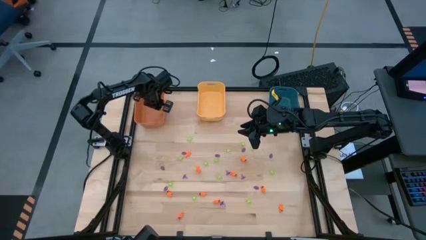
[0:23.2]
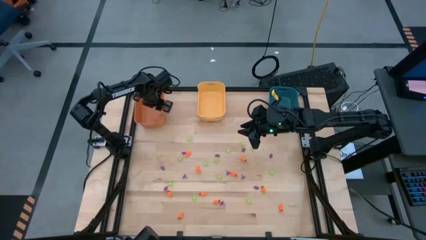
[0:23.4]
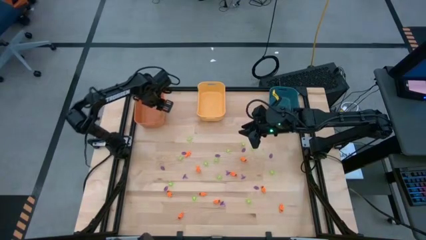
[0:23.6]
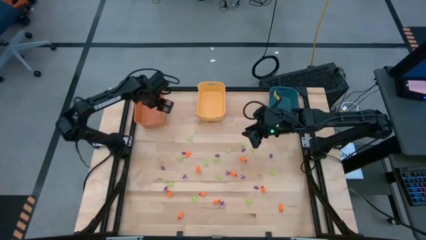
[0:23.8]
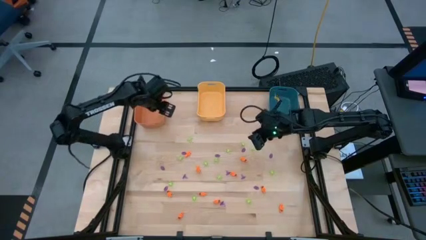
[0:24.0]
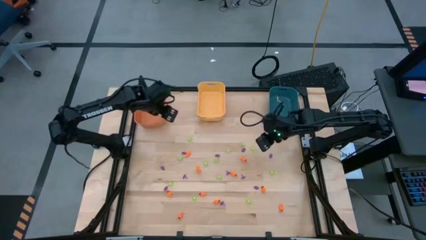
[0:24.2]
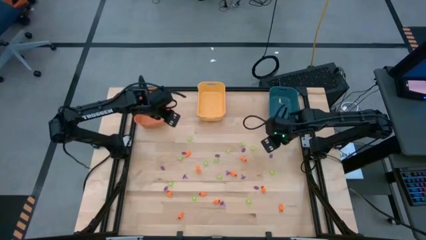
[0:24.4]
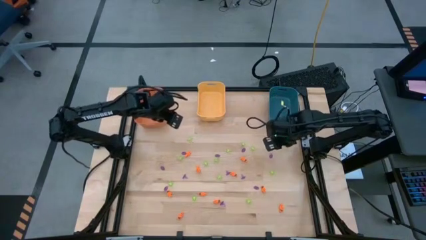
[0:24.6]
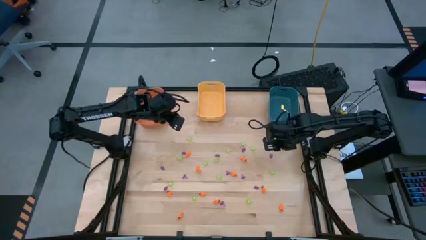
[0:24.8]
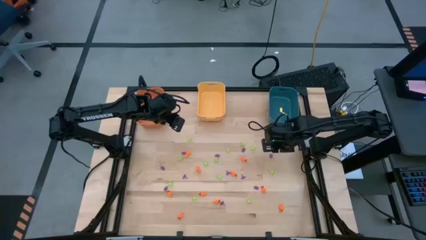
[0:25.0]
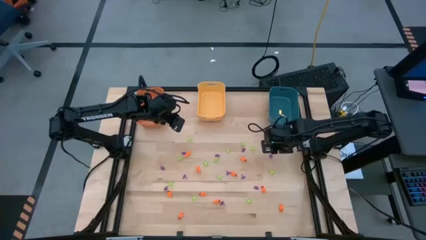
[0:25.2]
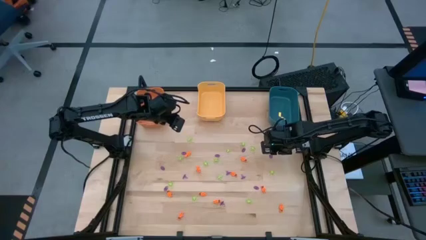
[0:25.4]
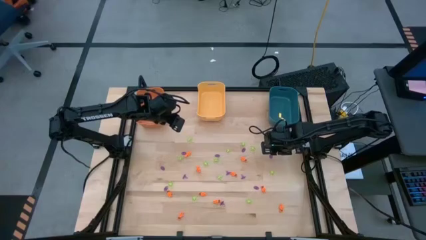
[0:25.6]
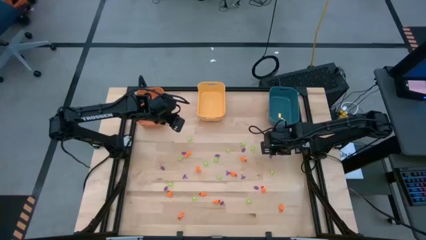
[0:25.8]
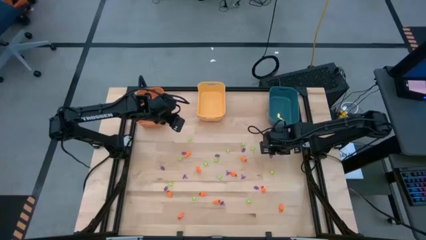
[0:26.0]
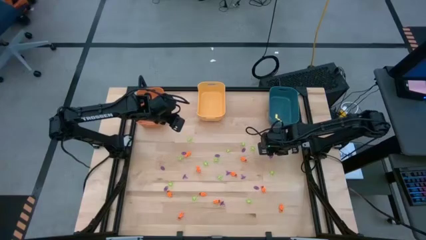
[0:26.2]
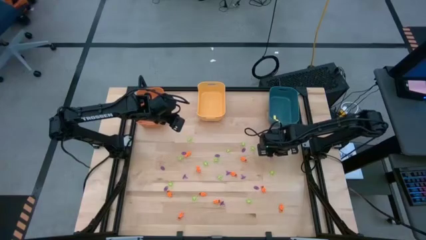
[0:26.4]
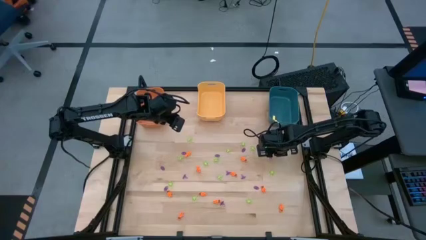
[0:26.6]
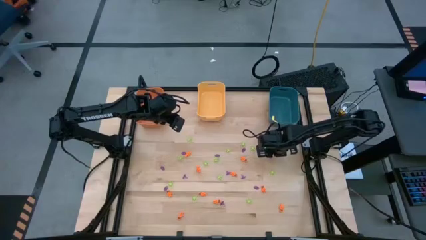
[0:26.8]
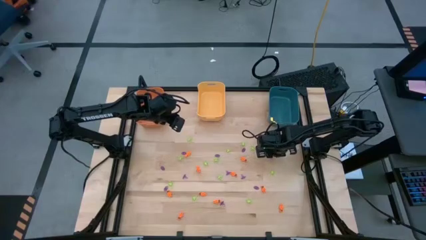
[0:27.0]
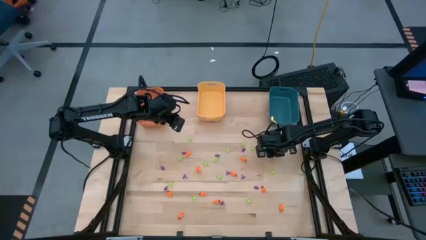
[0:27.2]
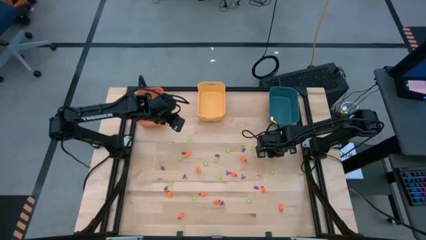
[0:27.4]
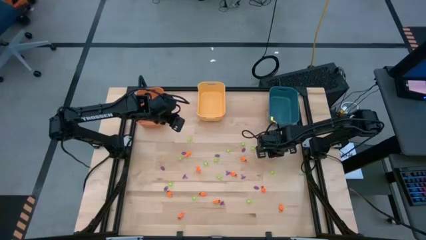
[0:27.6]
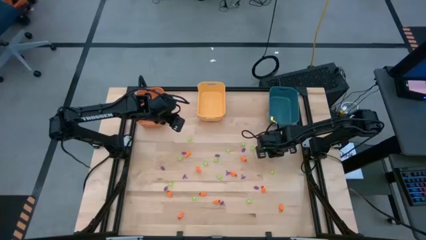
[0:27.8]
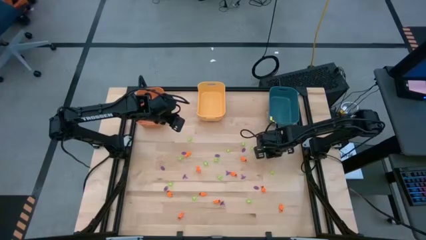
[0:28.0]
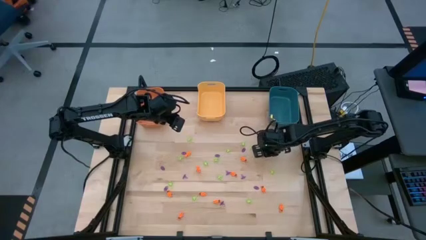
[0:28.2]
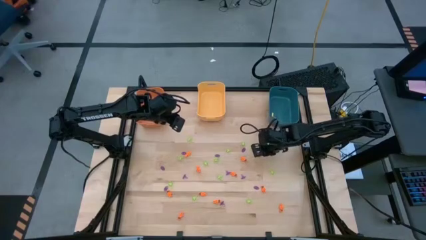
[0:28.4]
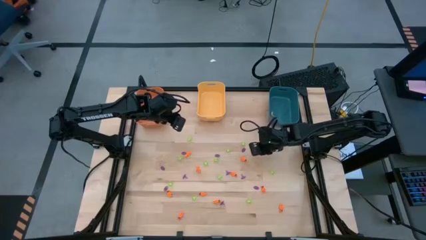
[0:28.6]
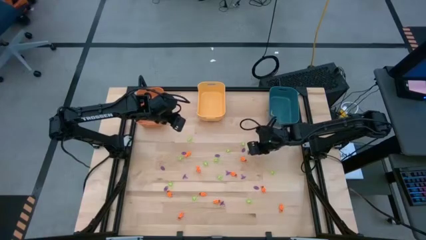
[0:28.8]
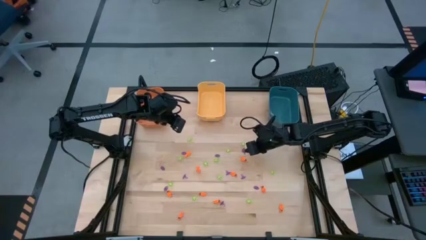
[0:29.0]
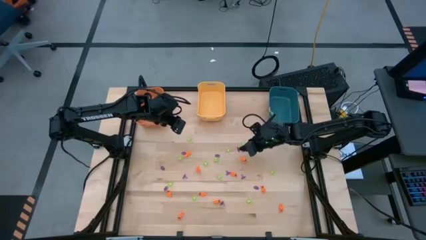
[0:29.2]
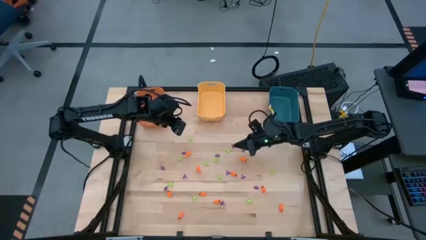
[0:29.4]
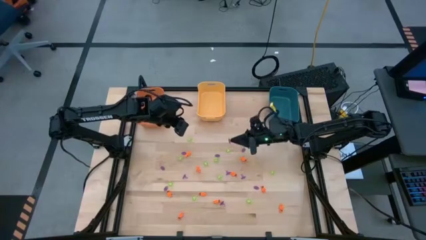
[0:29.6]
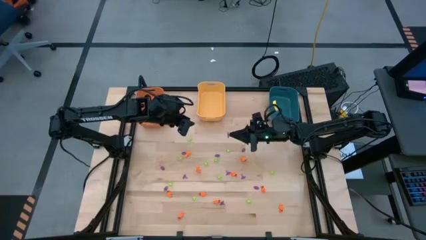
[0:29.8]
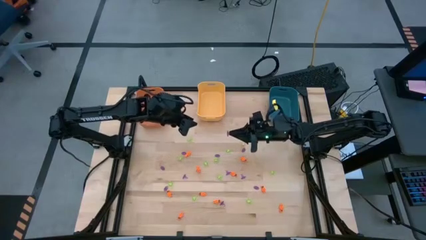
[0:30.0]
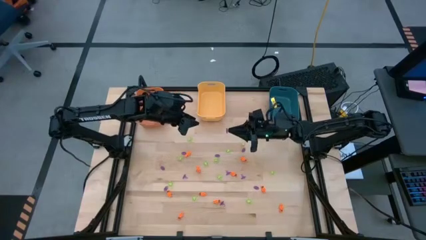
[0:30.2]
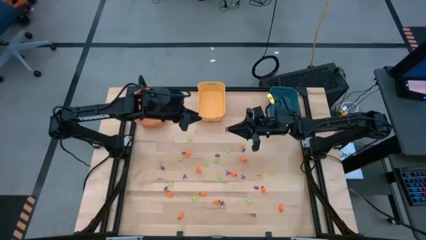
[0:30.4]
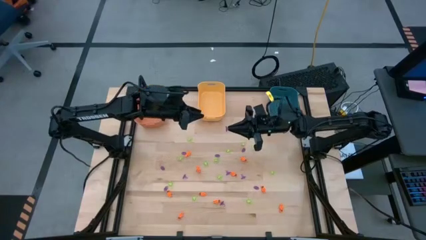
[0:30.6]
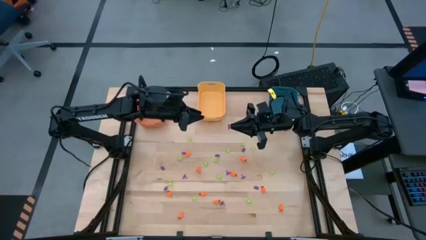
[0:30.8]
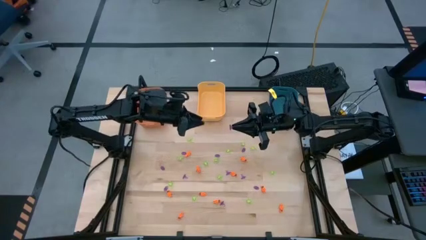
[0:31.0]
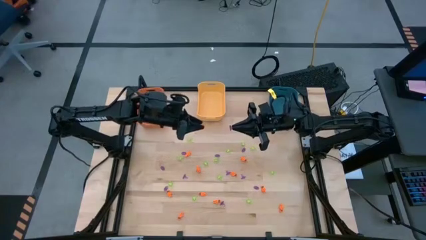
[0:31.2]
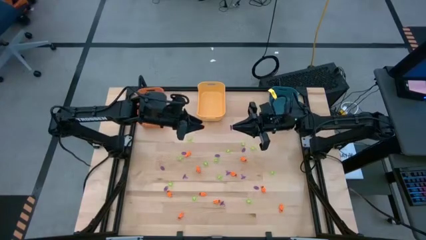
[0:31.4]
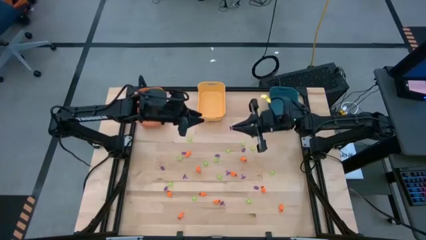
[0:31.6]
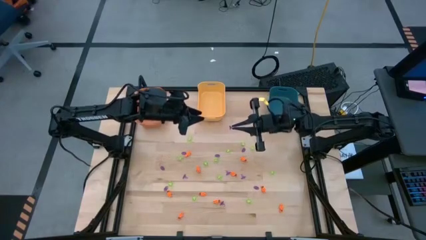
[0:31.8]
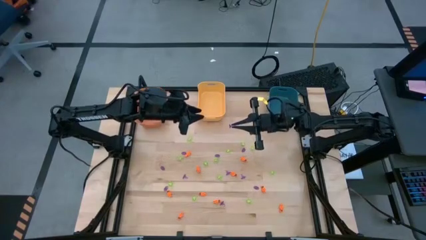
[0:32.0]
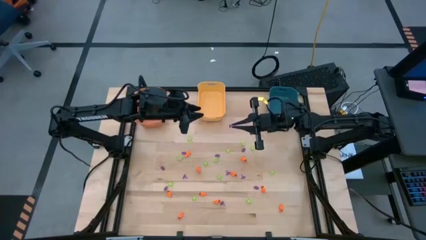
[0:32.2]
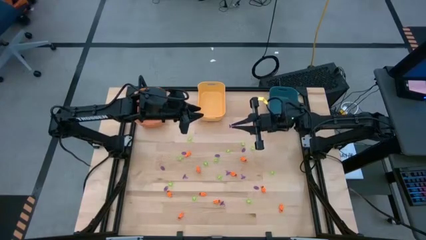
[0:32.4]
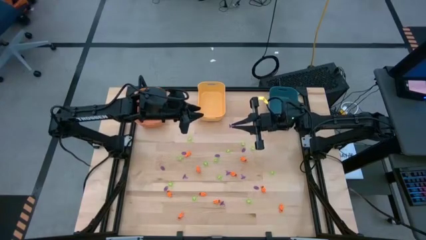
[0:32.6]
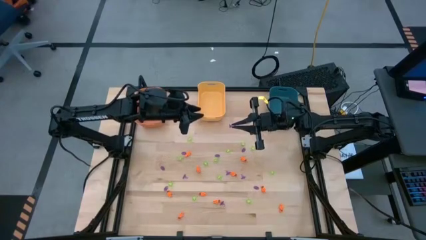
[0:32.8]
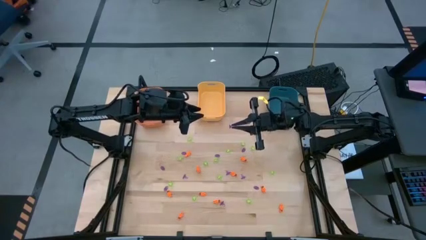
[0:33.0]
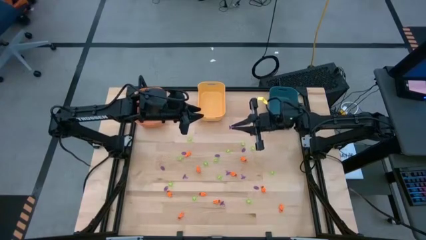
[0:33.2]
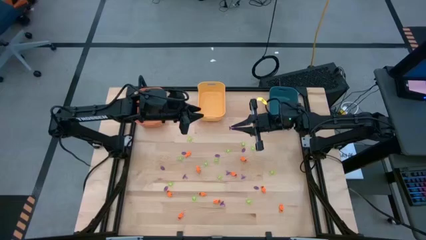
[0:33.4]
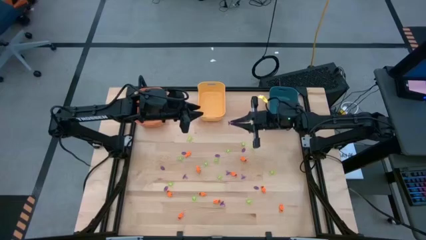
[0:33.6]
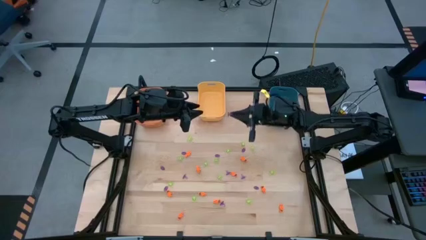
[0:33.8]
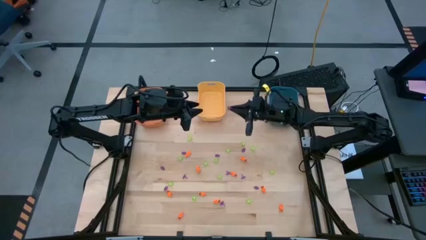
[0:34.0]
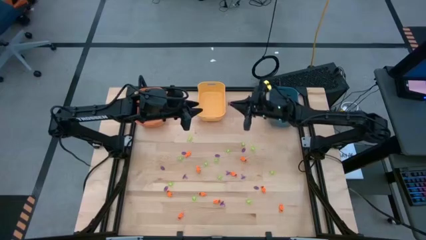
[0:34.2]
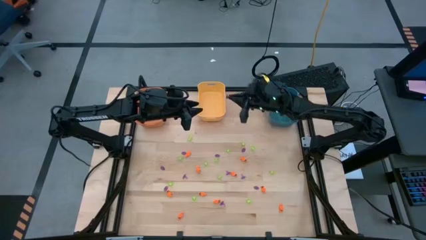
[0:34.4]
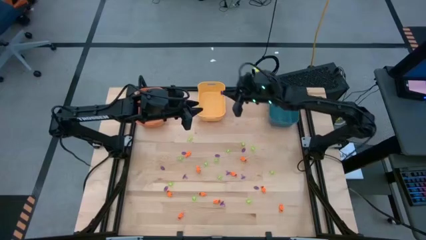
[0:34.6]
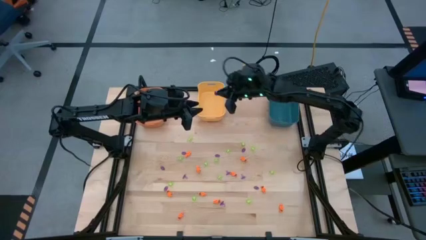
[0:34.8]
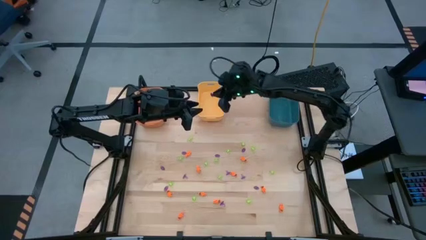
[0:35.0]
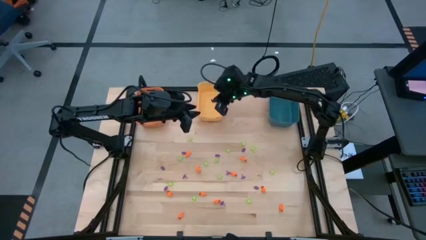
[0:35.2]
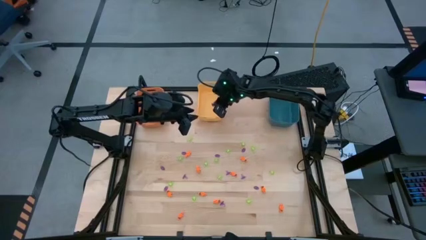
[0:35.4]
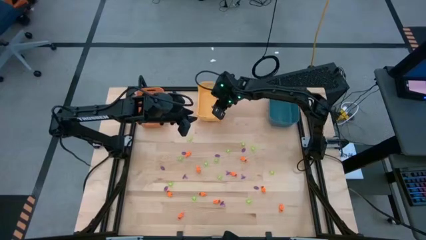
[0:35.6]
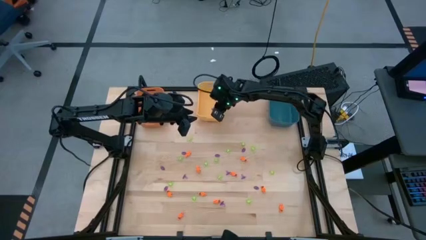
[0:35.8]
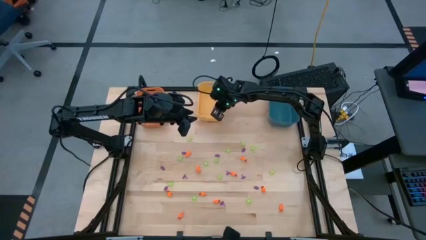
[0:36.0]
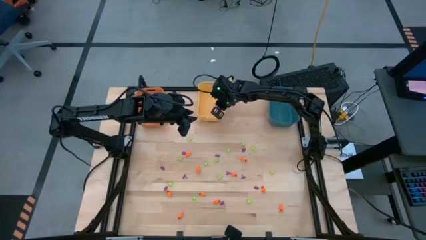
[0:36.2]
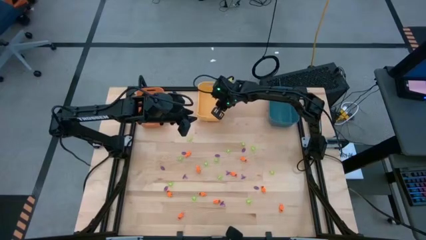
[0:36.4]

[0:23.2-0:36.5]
Task: Sort Halloween decoration
Put the purple witch hat toy into the yellow bin

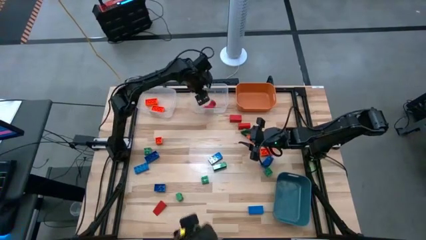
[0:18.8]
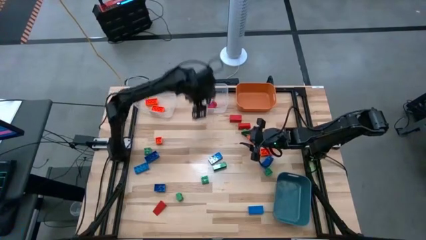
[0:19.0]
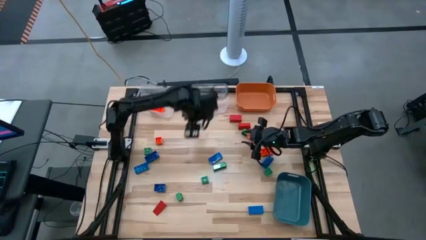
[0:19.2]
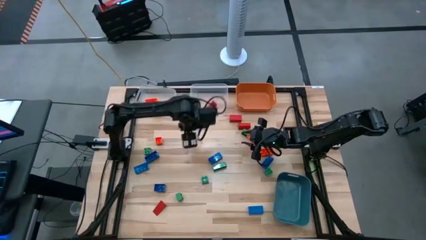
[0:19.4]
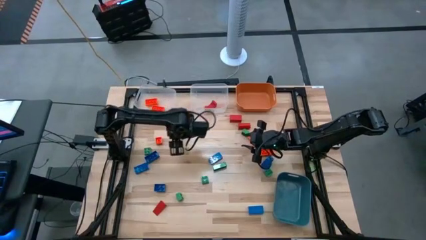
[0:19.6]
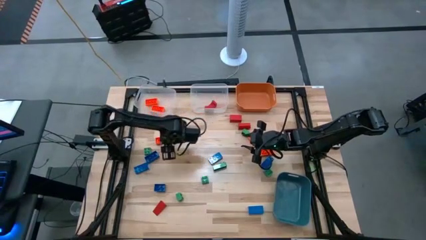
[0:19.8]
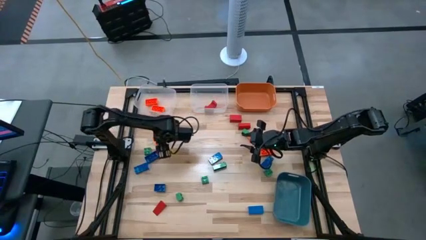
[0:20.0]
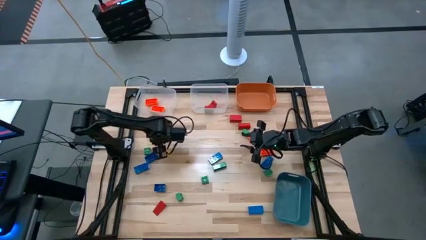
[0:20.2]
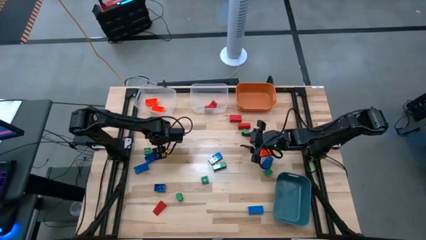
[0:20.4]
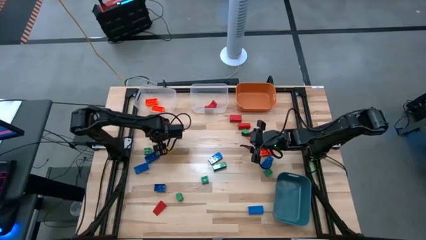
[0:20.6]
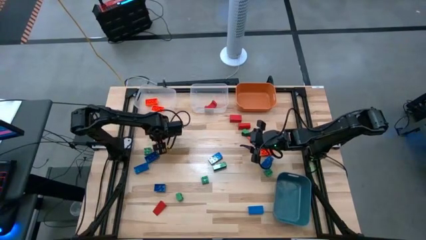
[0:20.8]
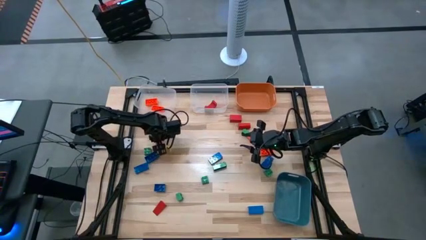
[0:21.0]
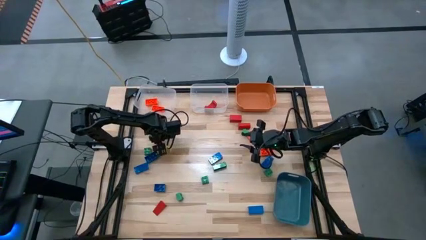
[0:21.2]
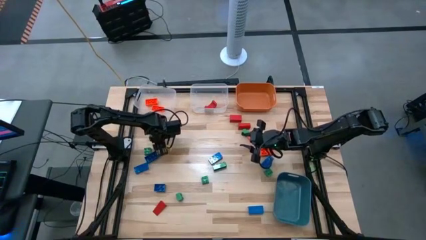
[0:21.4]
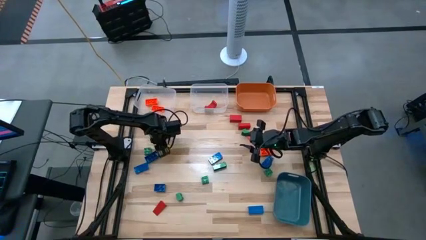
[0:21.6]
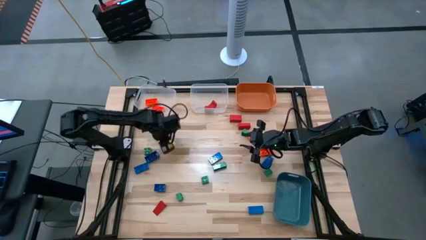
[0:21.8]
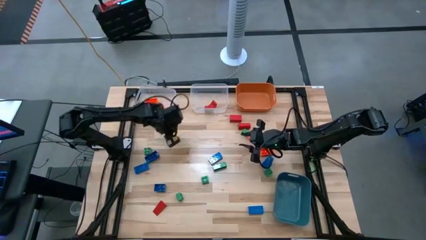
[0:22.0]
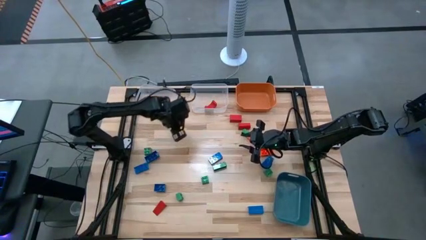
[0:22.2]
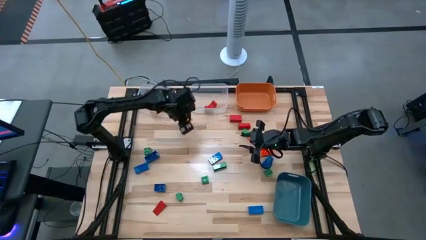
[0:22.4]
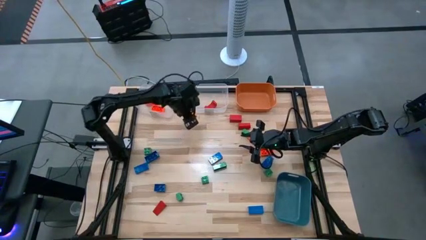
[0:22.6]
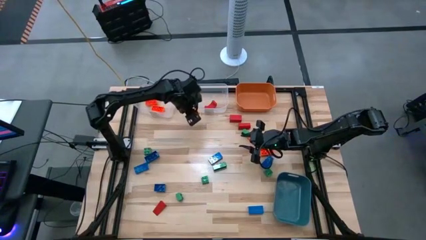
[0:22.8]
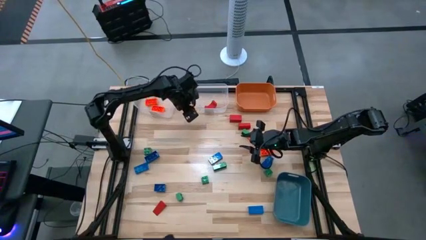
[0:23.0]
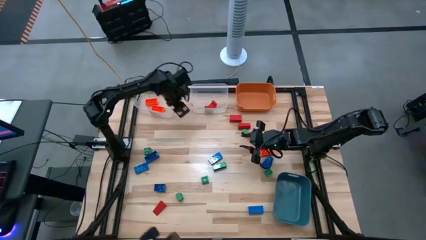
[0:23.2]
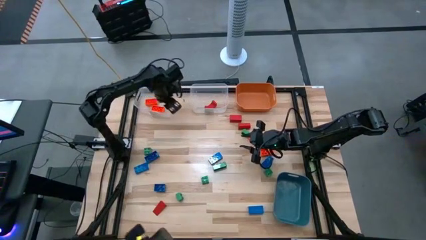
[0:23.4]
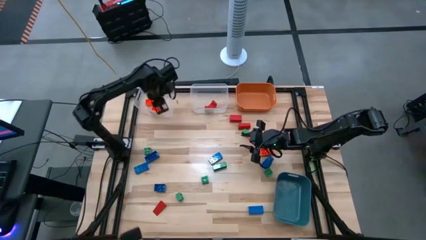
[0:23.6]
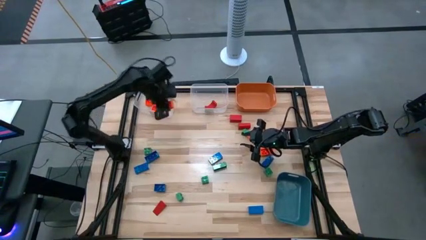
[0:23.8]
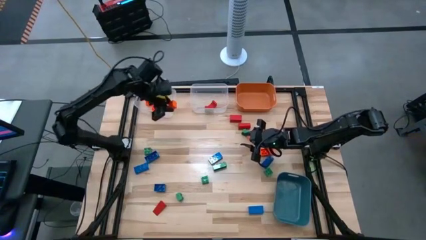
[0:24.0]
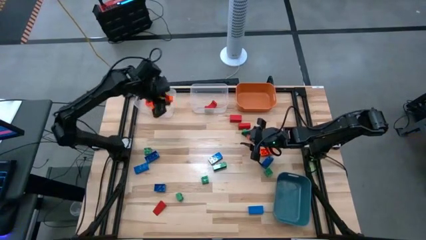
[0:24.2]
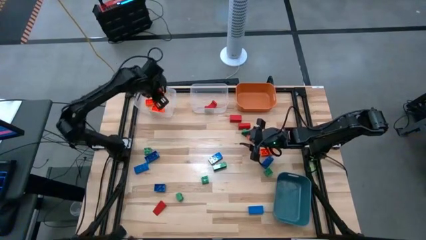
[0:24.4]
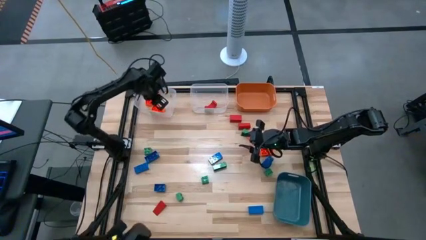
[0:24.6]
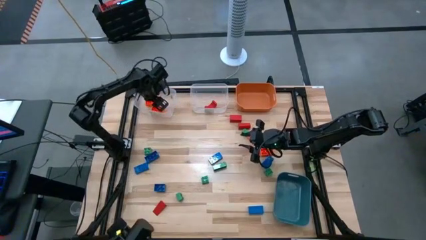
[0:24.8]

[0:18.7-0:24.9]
Task: Sort blocks
Put the orange game piece into the left transparent bin
